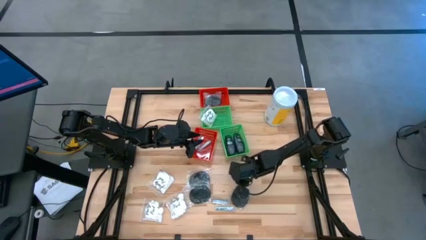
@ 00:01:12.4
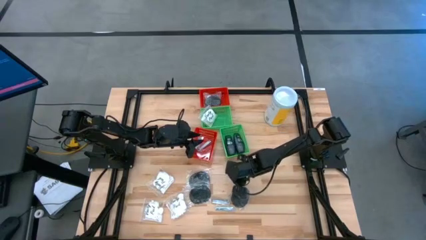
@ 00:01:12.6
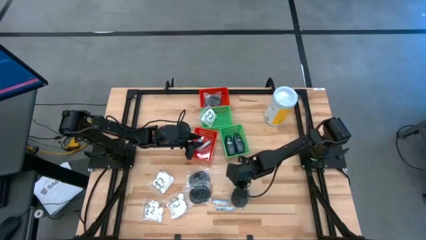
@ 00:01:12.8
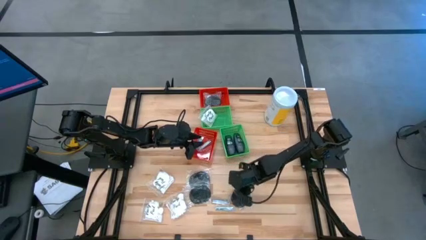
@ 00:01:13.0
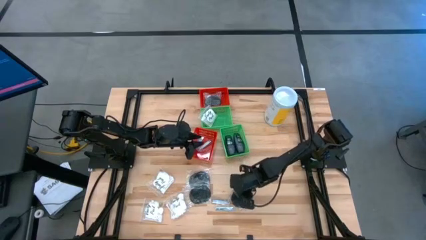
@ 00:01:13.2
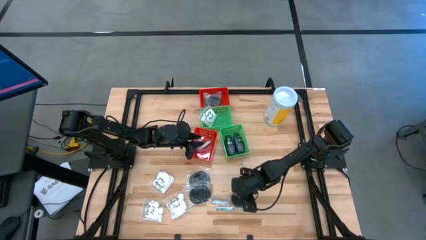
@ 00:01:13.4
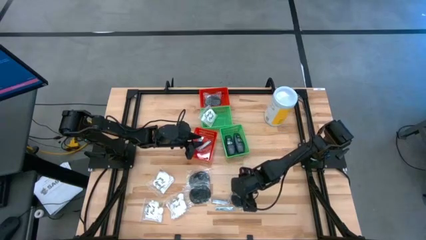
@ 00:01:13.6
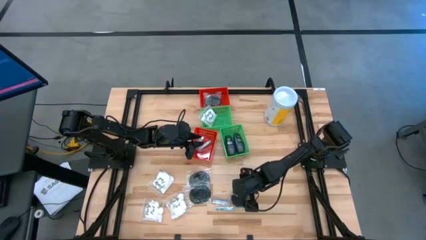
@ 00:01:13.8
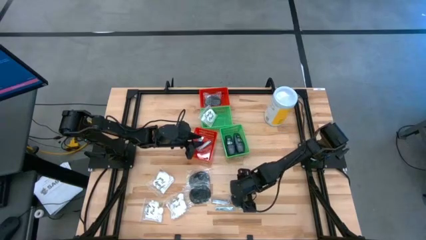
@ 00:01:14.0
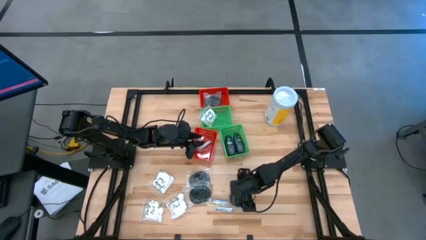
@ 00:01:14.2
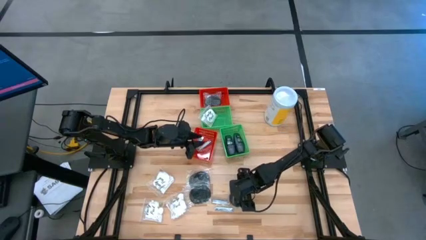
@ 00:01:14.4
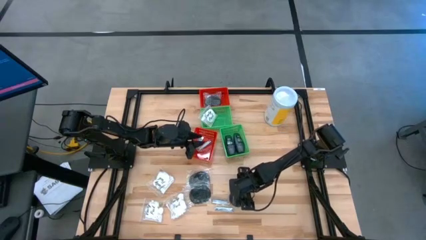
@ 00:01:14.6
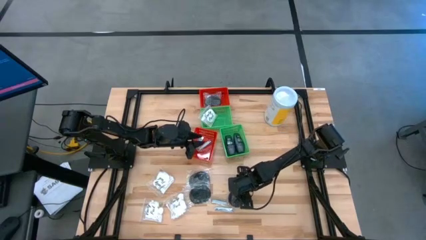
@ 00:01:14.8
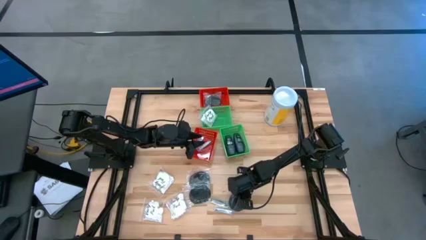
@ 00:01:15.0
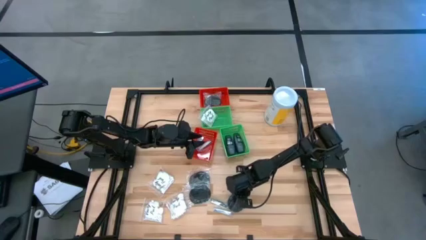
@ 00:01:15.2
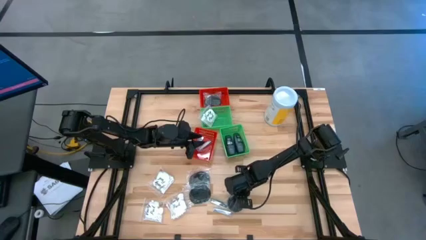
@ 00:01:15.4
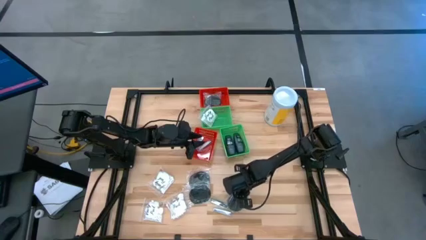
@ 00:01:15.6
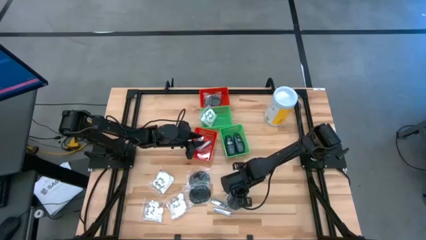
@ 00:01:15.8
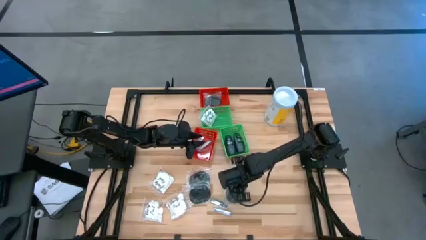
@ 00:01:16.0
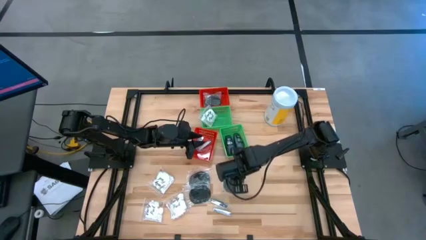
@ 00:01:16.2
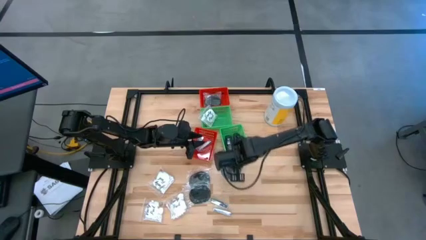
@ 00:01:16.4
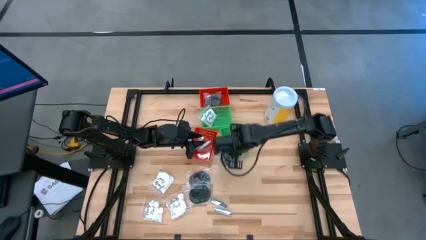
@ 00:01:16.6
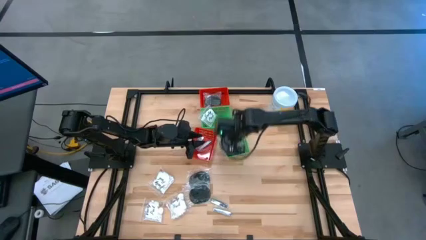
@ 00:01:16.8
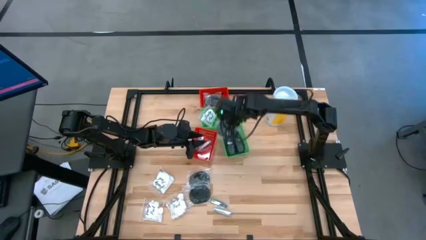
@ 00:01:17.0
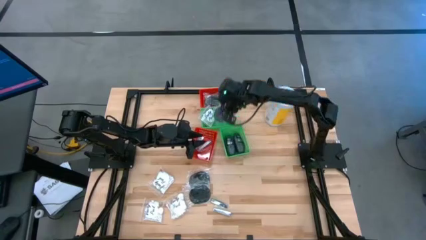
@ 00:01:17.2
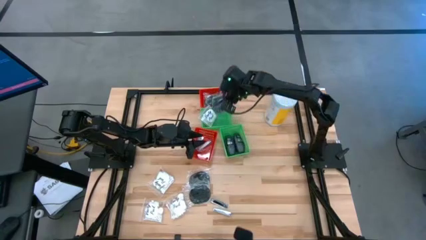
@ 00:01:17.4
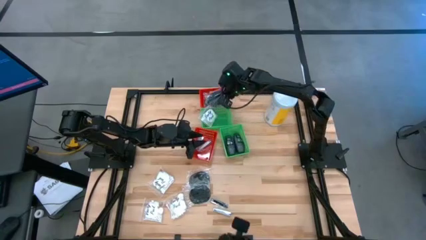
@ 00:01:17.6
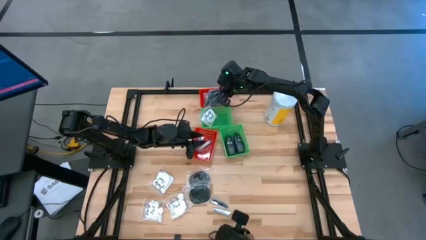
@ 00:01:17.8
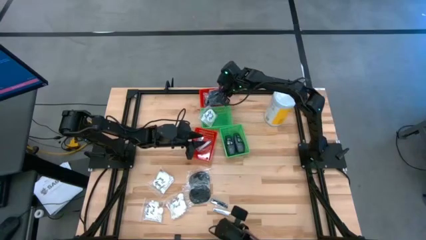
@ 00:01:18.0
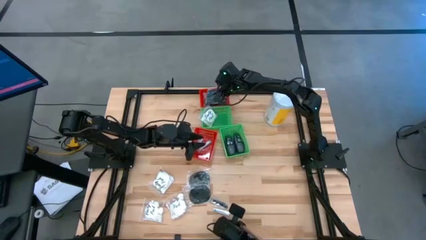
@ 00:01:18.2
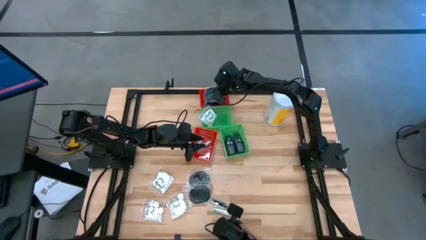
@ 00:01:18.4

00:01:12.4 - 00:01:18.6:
Task: Pick & Place Travel size toiletries
Put the black hairbrush into the top red bin

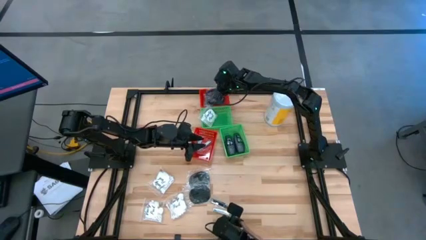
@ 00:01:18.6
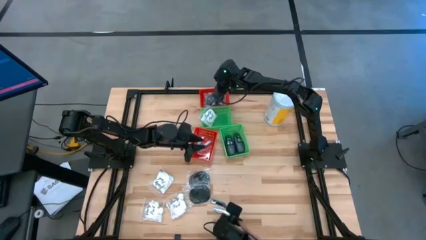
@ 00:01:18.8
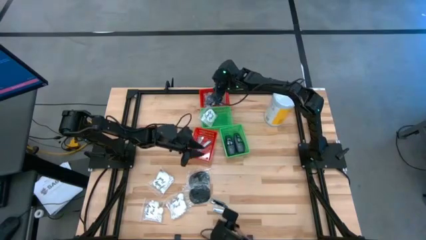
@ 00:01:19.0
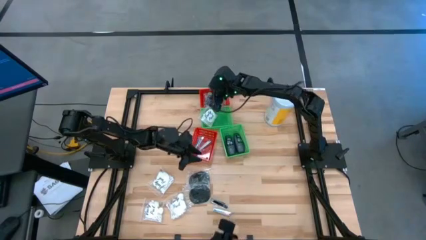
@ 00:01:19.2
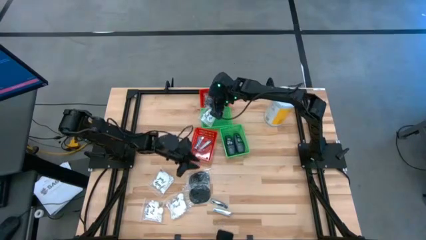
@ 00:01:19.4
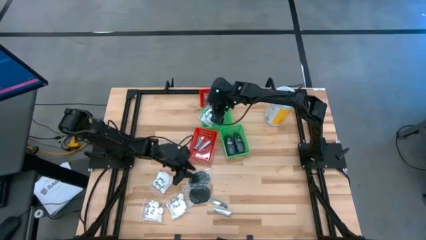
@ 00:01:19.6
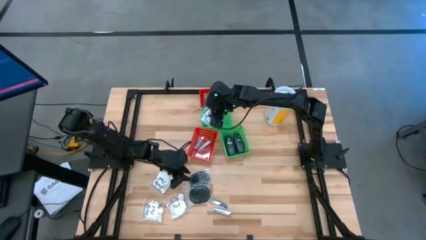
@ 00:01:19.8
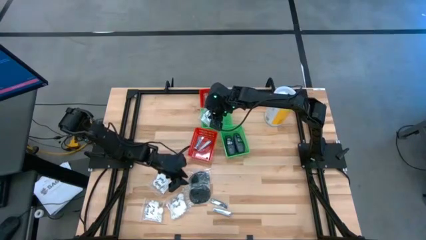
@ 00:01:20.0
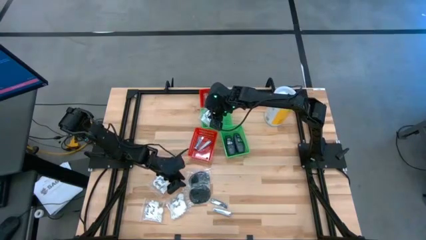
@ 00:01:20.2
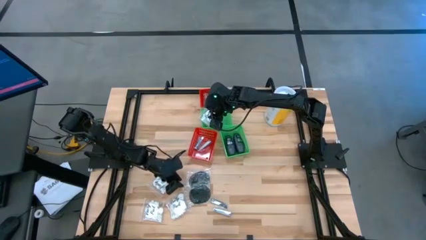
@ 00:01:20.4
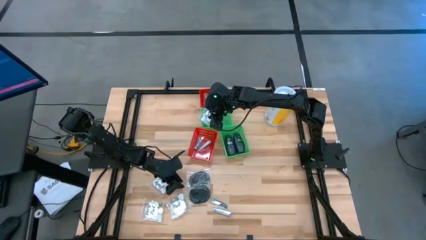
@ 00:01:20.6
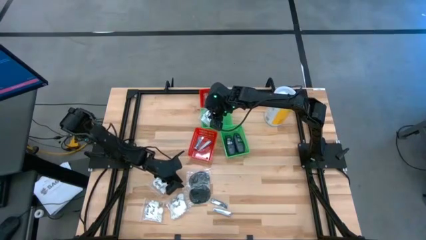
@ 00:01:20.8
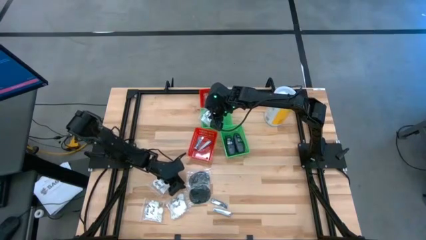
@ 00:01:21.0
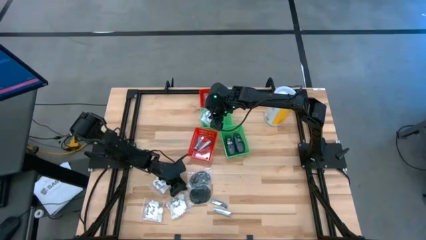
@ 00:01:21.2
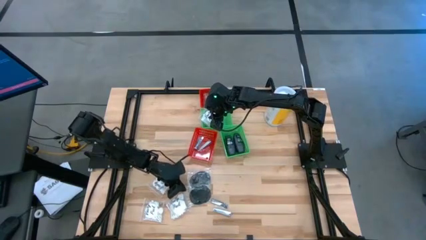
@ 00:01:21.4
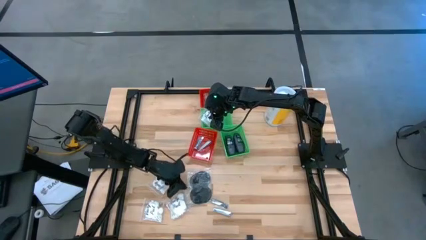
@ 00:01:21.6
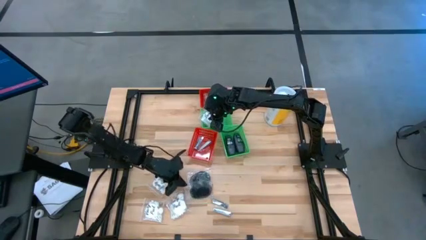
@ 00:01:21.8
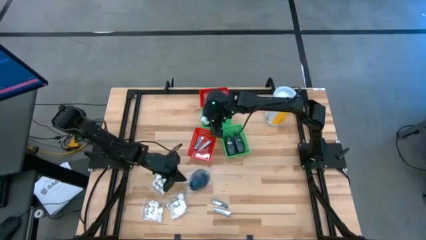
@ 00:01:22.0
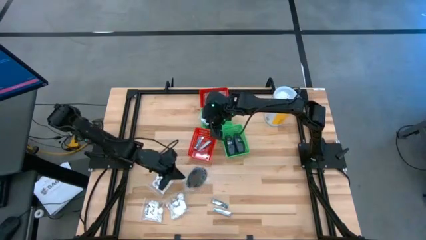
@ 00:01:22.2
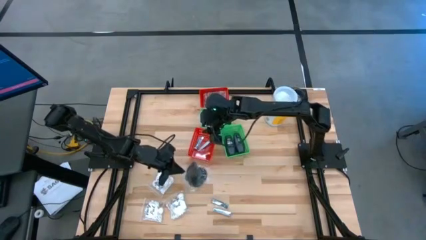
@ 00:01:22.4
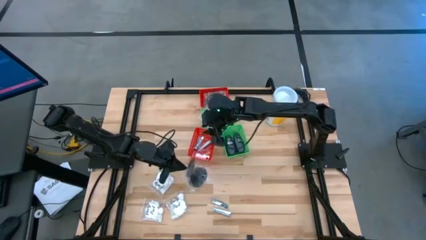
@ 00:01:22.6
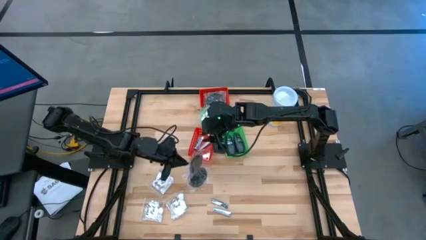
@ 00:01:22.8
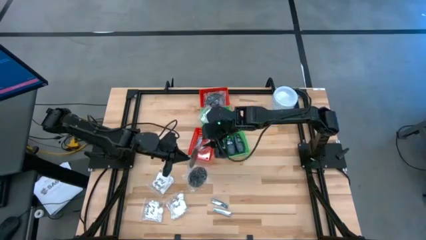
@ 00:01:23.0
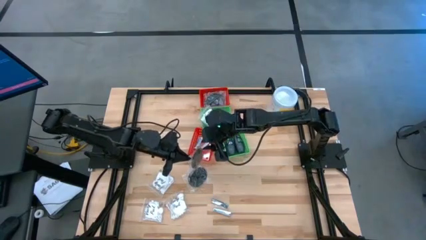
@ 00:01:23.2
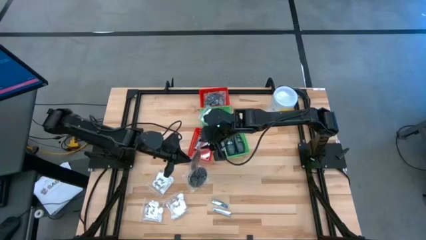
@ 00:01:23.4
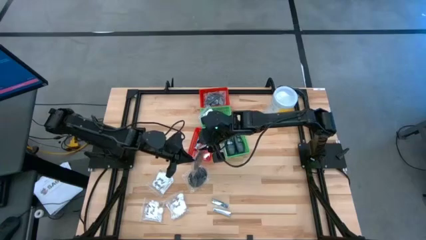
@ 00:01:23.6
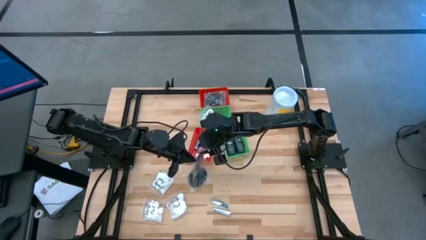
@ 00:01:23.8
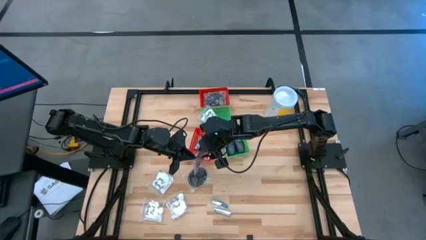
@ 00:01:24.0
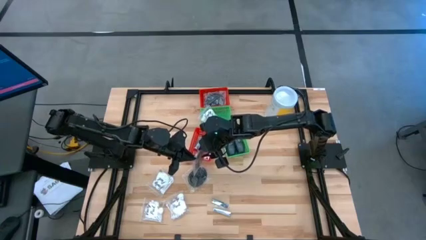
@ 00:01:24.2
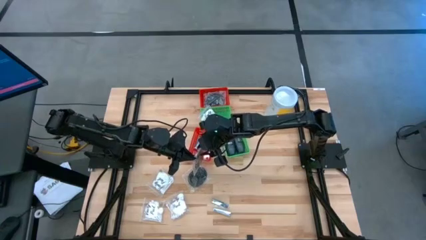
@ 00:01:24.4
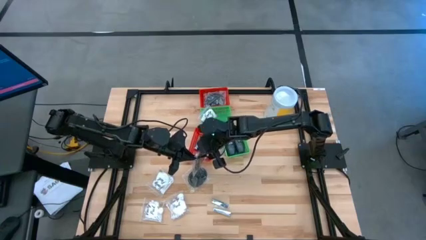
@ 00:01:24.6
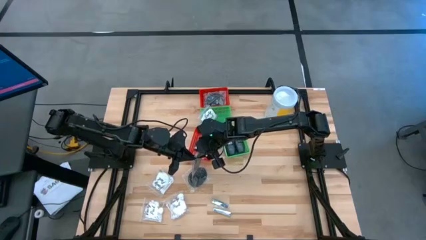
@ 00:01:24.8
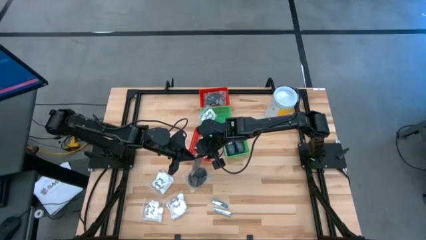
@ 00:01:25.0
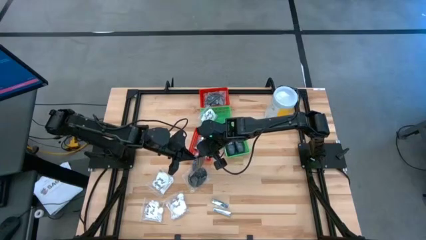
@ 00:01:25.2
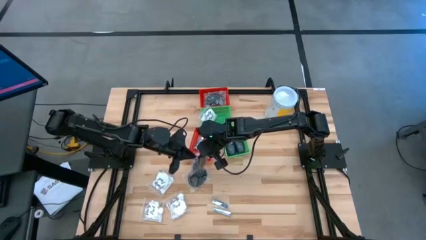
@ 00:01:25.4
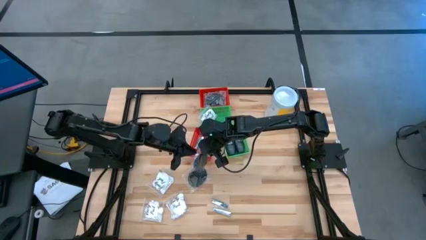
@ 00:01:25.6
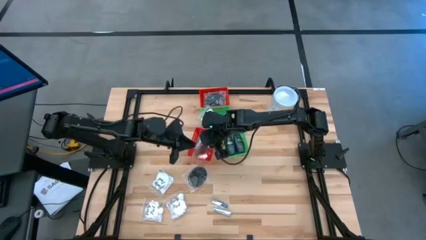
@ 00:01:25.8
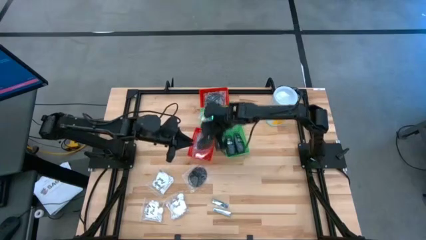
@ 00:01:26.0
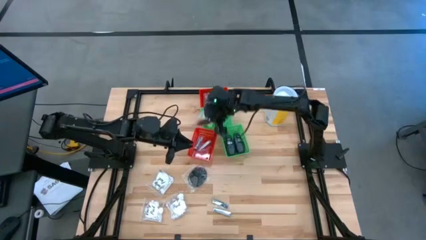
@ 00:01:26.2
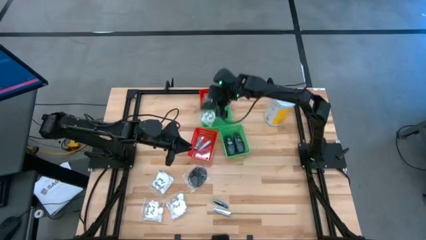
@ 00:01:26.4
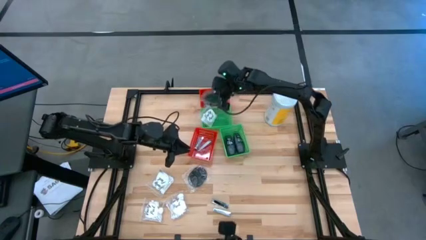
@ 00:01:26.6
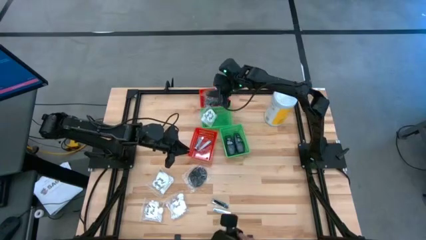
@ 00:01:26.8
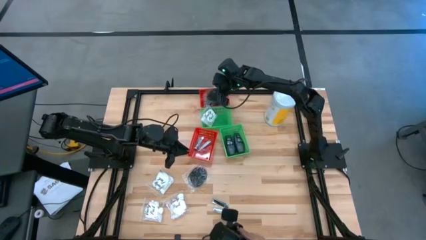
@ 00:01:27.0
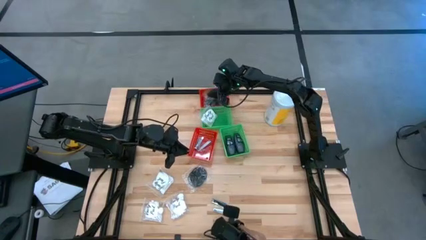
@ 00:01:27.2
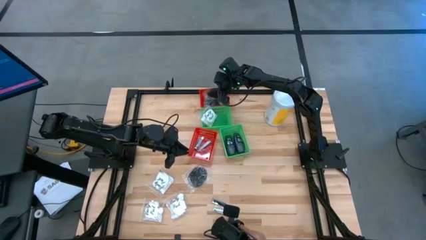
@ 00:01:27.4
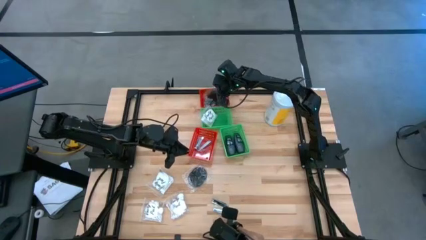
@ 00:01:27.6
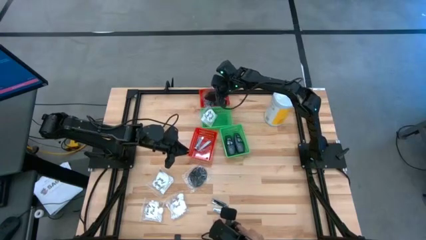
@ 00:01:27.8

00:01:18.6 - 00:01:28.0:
Put the black hairbrush into the top red bin
